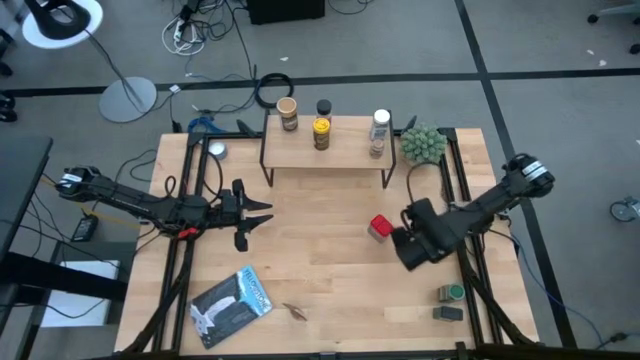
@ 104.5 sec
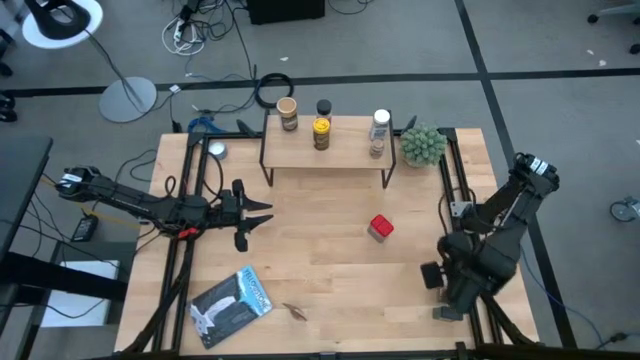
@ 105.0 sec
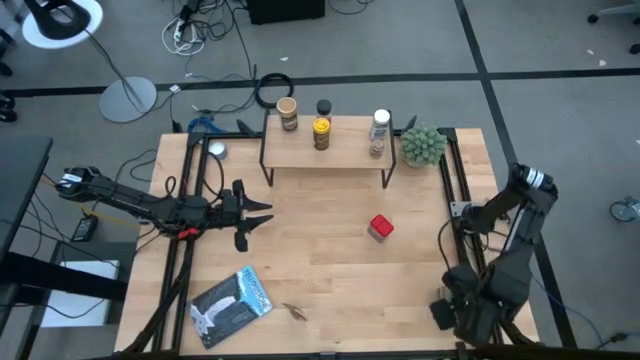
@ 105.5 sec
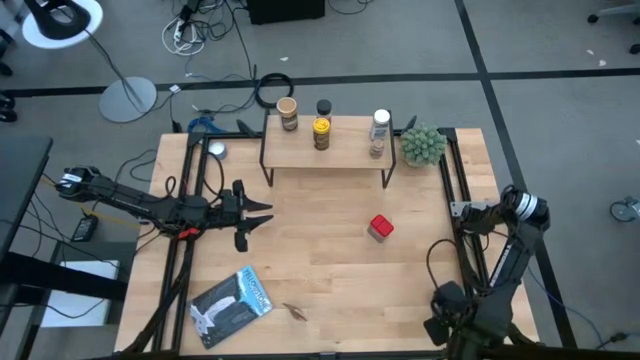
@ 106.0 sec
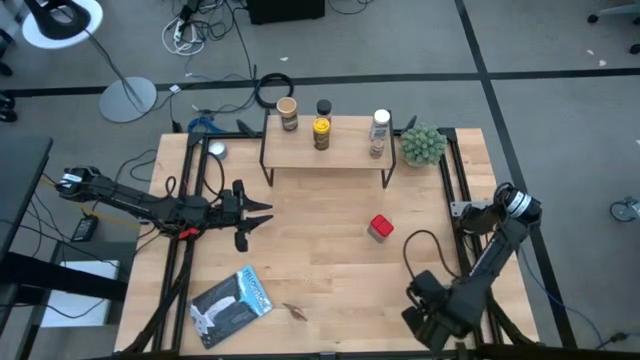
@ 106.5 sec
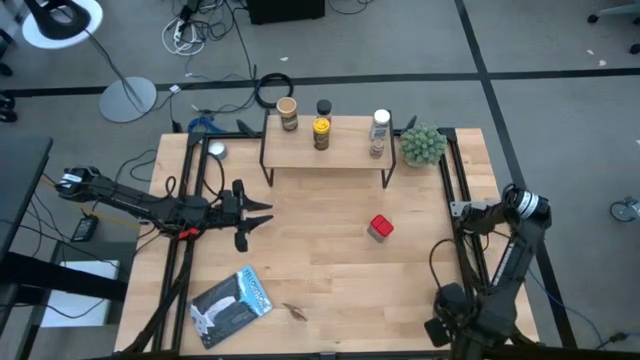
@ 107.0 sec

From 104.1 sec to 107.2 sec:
Task: Shelf spices
Move the green seasoning can to the center of the table

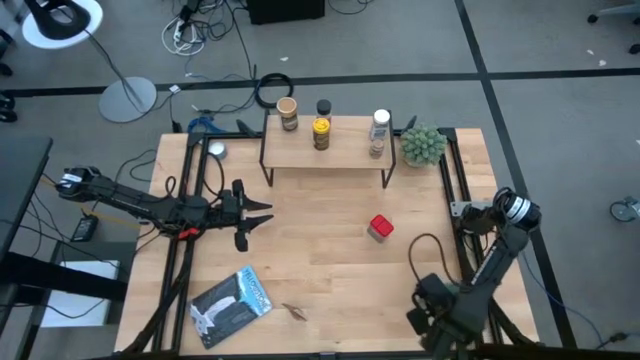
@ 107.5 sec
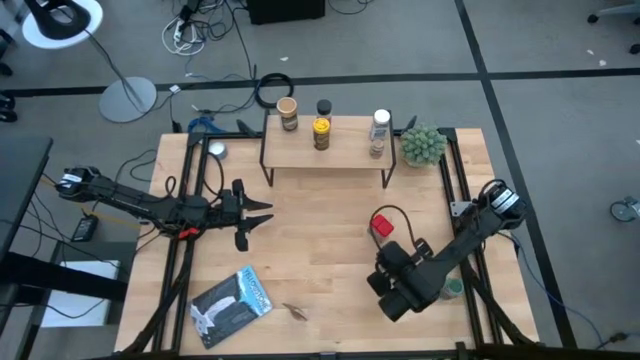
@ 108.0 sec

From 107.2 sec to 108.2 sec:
Move the green seasoning can to the center of the table

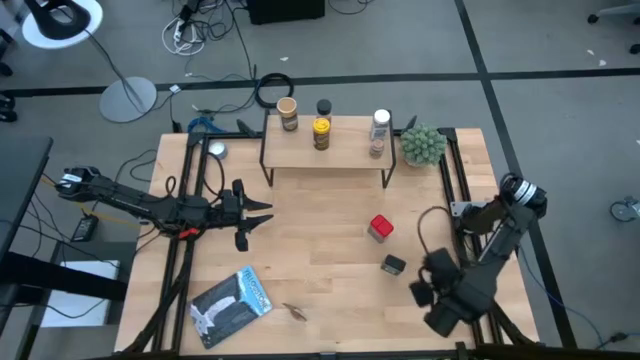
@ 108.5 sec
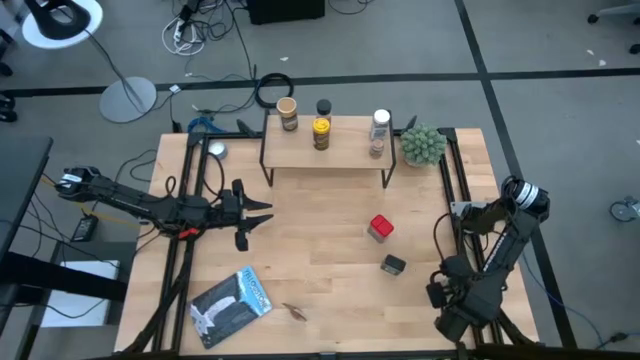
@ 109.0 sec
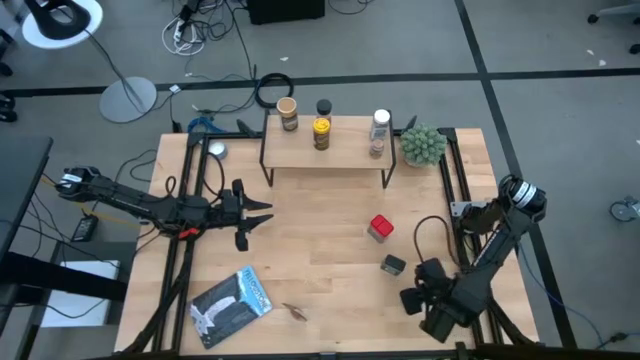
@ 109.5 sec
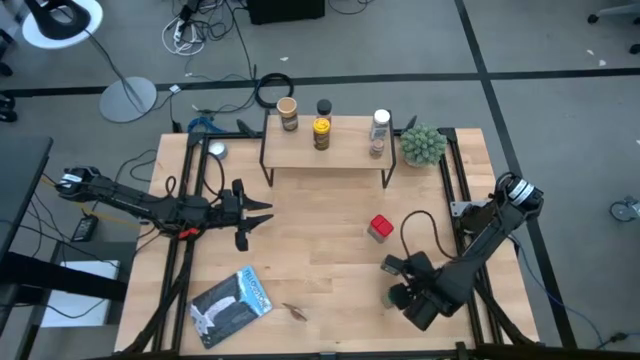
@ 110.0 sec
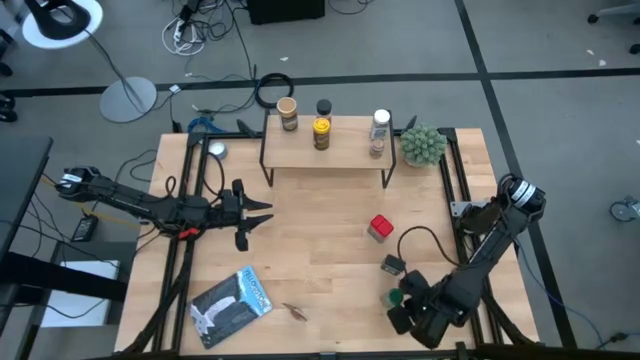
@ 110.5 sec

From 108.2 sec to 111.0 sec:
Move the green seasoning bottle to the center of the table

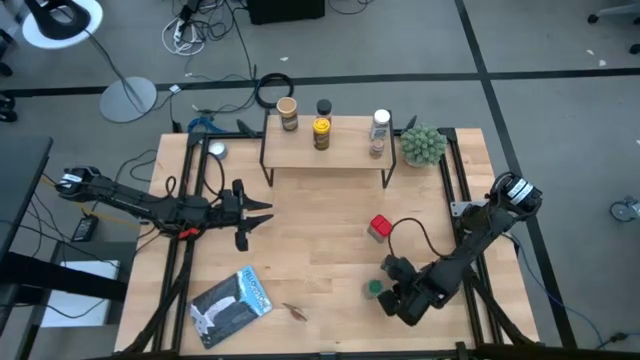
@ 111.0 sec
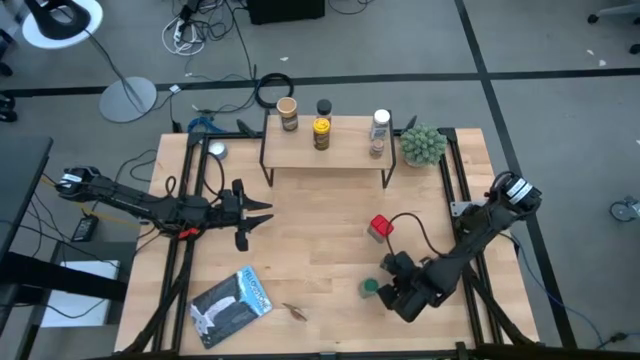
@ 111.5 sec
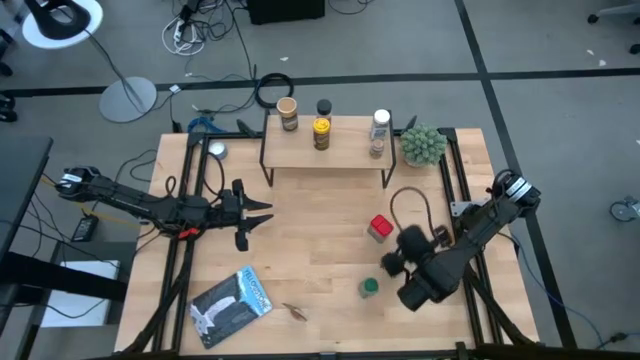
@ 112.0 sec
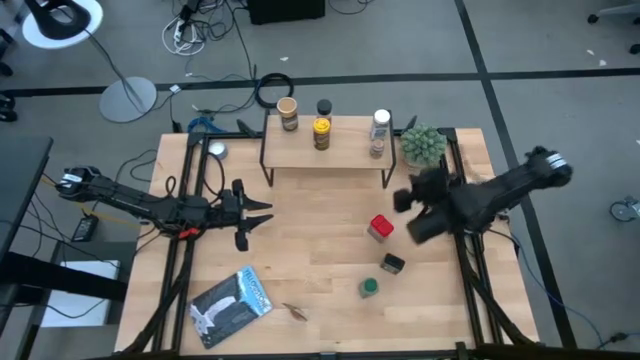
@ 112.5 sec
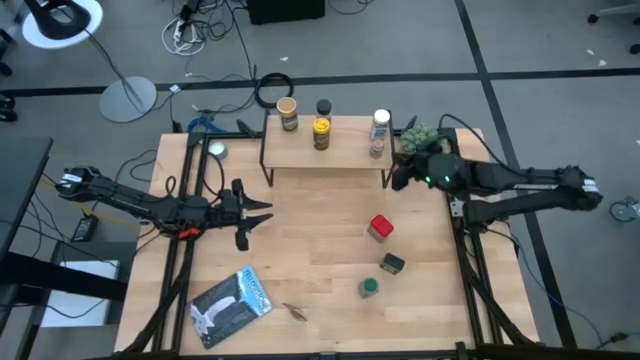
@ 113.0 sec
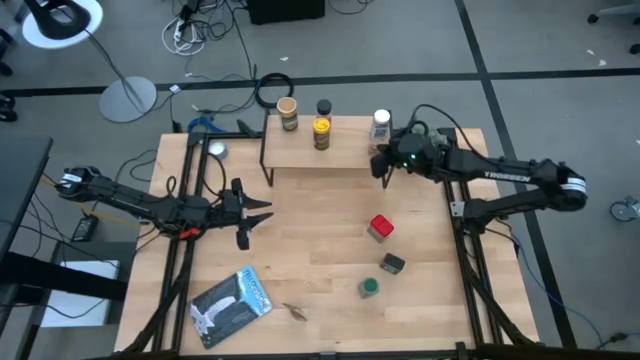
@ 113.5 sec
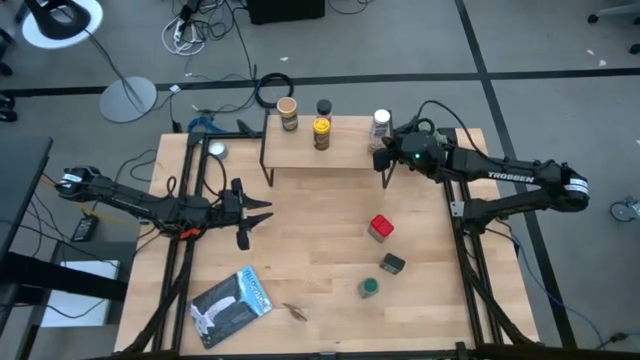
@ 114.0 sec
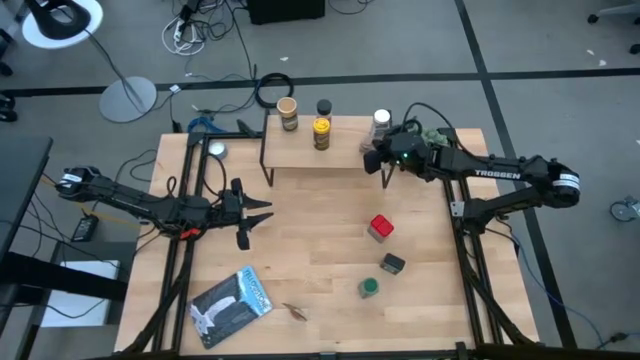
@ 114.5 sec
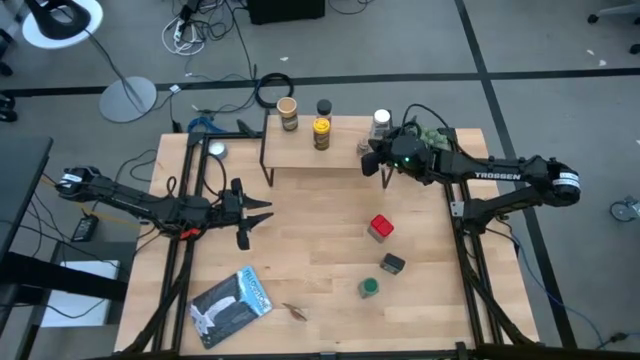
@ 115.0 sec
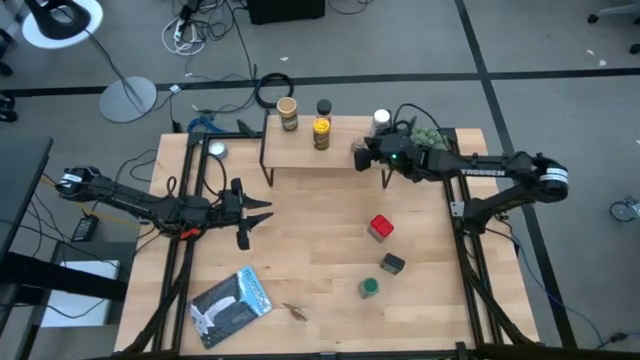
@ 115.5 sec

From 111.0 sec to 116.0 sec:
Move the brown seasoning bottle to the center of the shelf

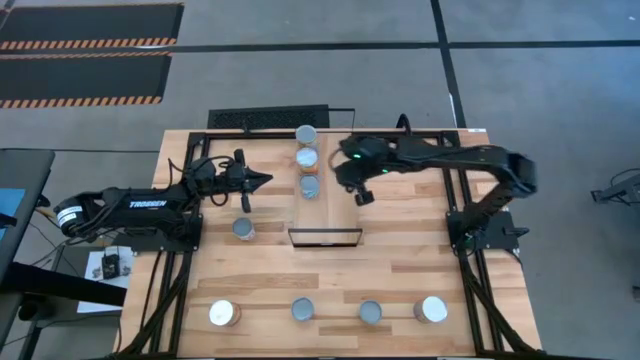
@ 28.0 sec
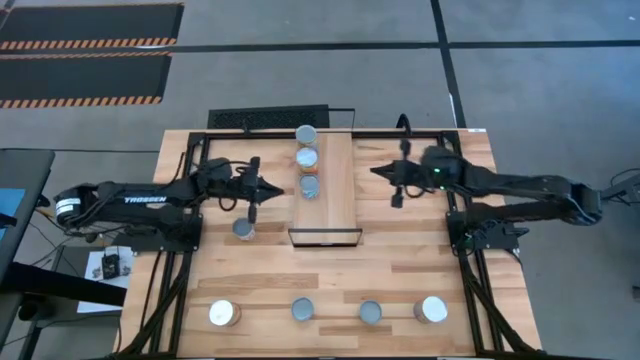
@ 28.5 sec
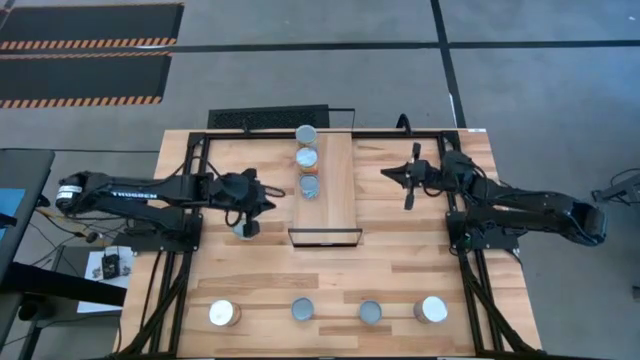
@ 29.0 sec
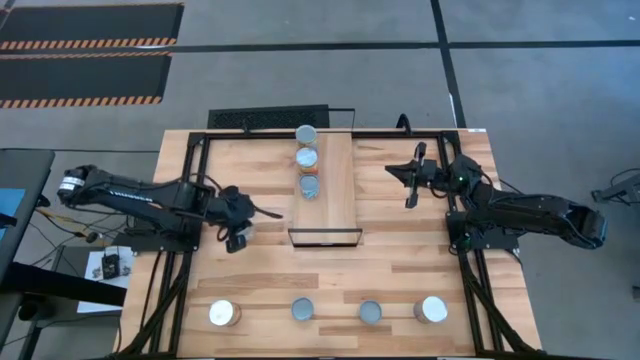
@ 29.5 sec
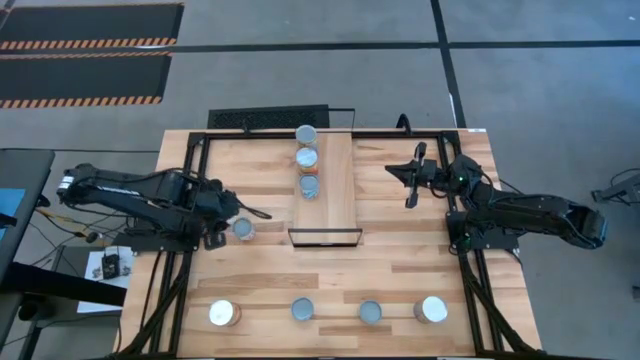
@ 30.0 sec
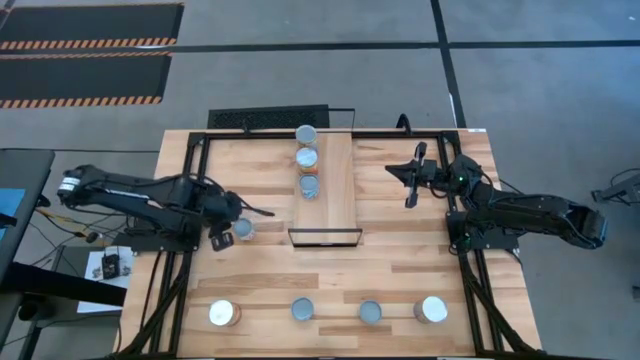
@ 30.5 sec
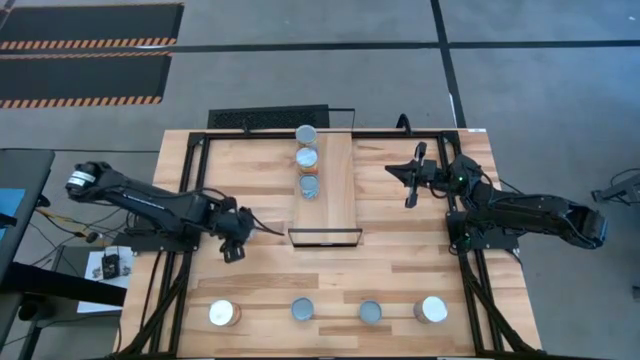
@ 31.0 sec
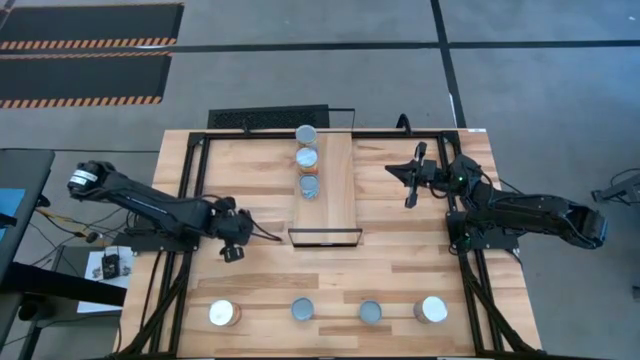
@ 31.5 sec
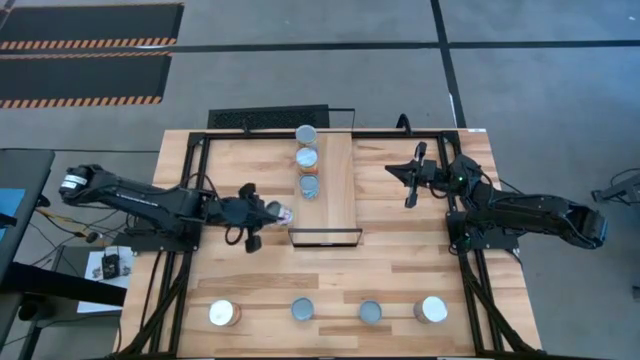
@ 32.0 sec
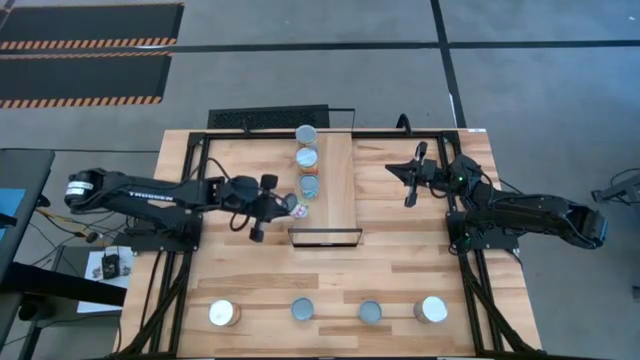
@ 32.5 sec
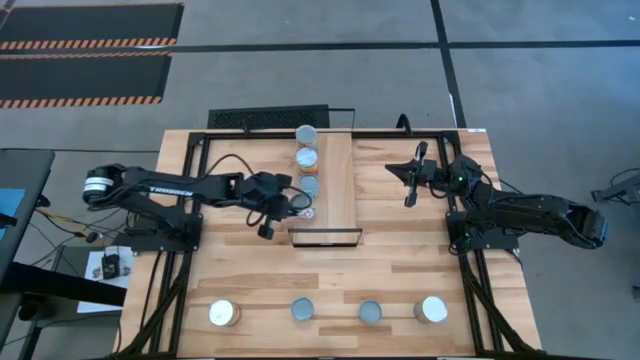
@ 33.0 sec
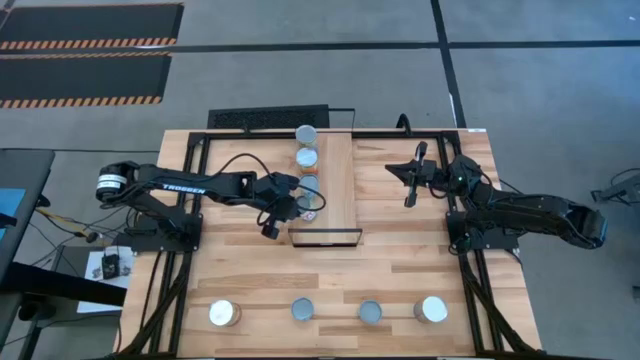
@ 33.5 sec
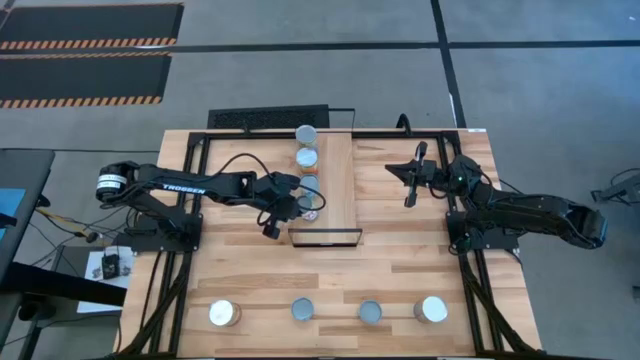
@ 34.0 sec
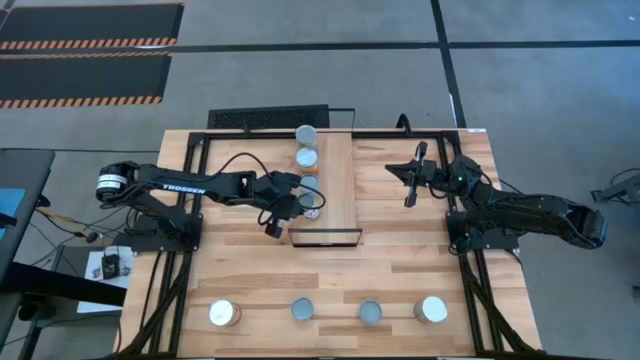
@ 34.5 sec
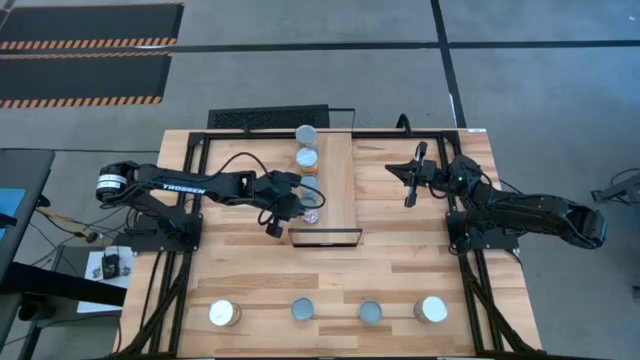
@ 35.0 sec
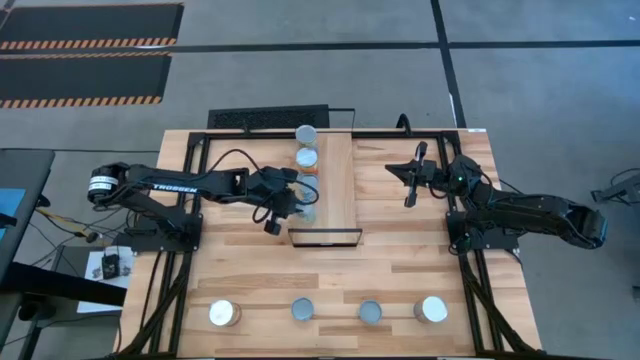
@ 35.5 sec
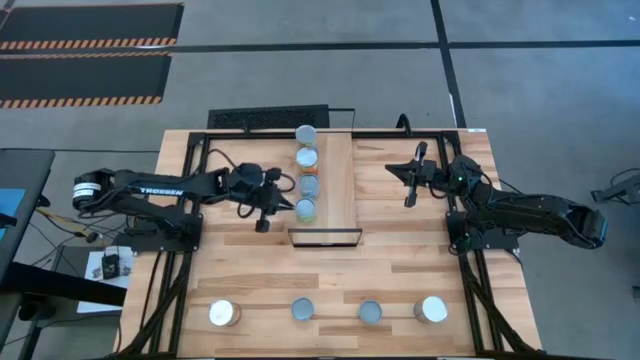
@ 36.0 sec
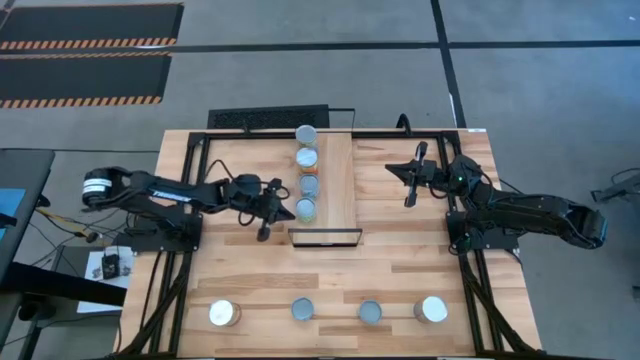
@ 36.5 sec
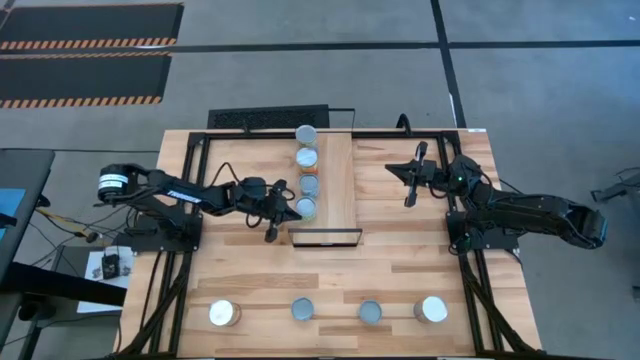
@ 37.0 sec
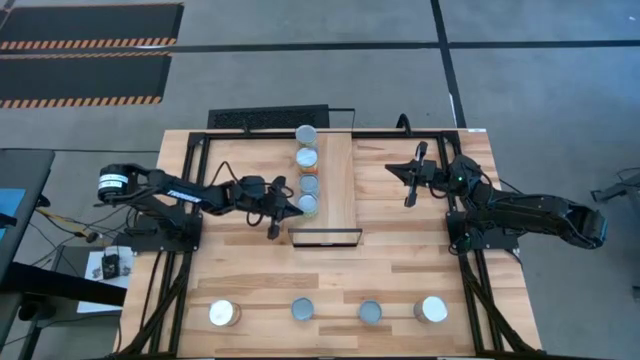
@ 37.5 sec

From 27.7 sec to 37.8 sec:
Task: Pick and place cans onto a shelf
Put the canned green peas on the shelf
